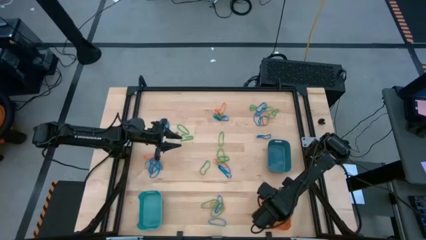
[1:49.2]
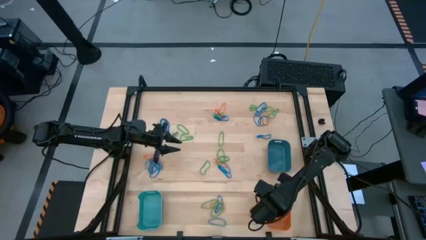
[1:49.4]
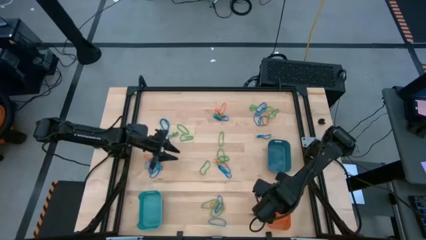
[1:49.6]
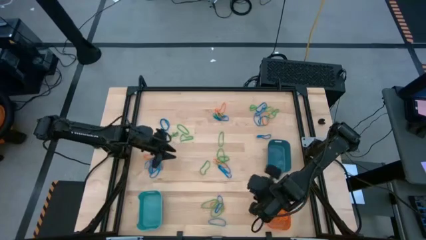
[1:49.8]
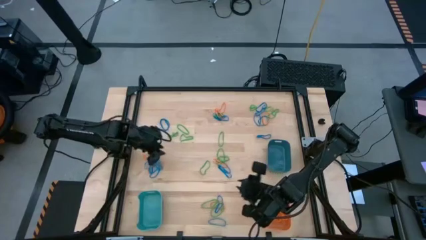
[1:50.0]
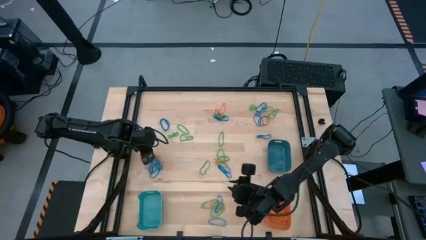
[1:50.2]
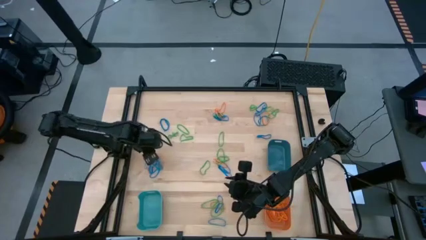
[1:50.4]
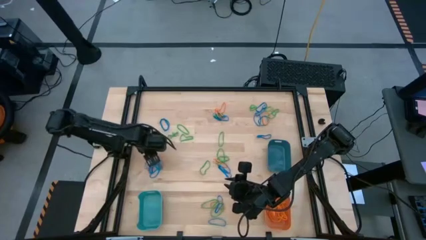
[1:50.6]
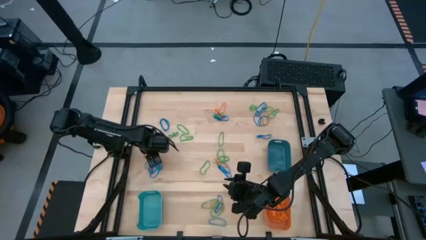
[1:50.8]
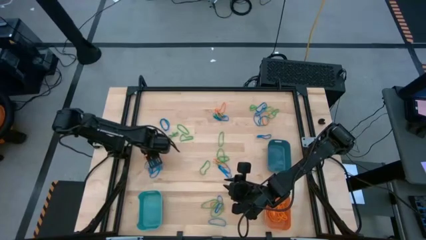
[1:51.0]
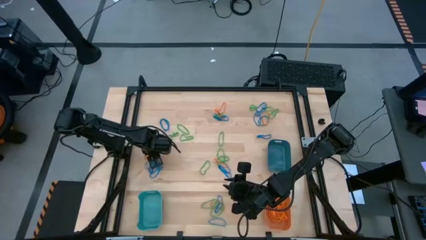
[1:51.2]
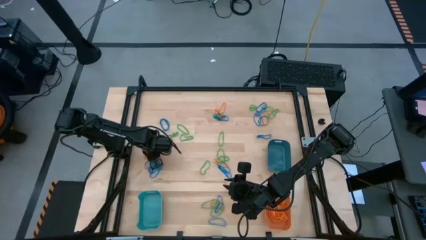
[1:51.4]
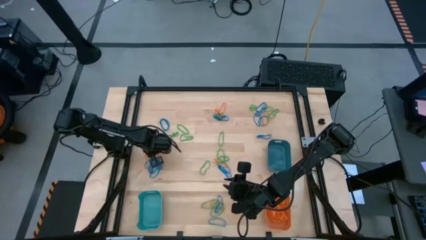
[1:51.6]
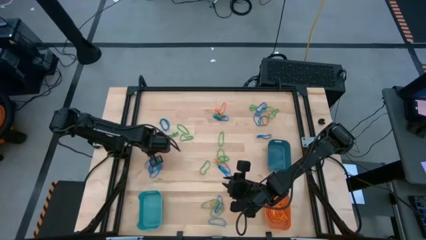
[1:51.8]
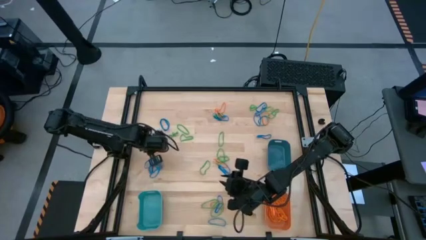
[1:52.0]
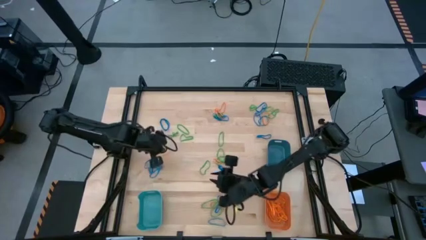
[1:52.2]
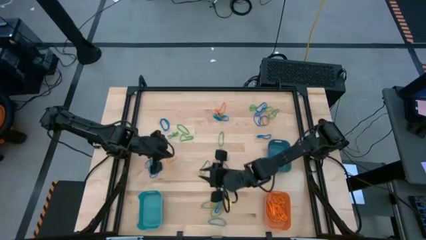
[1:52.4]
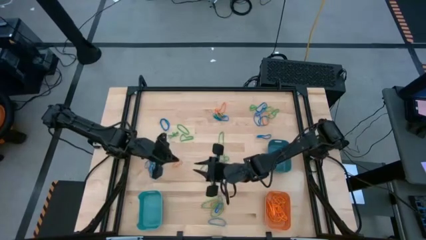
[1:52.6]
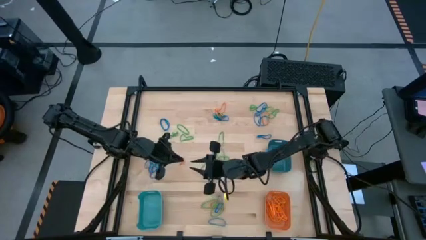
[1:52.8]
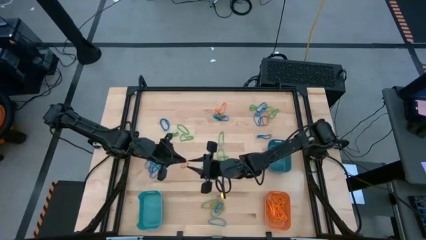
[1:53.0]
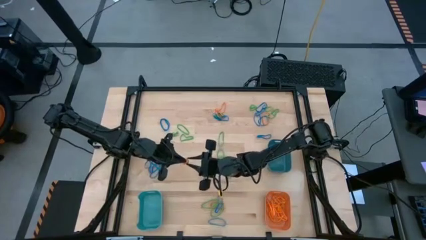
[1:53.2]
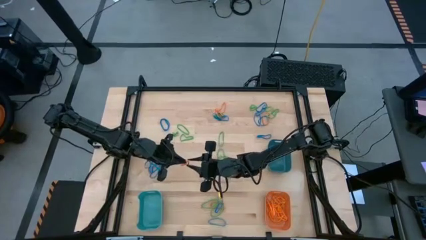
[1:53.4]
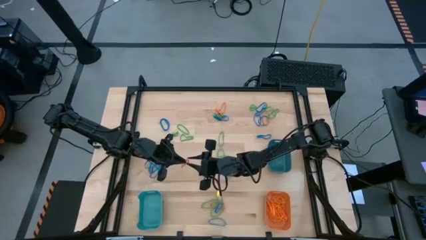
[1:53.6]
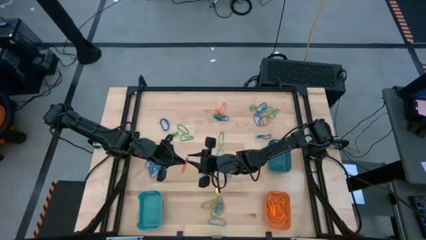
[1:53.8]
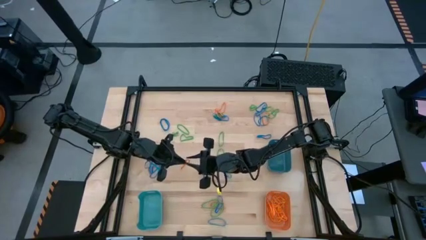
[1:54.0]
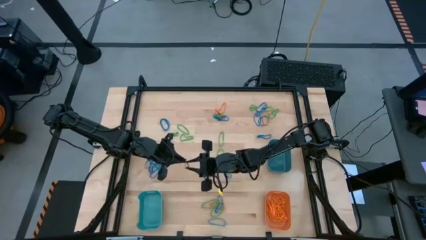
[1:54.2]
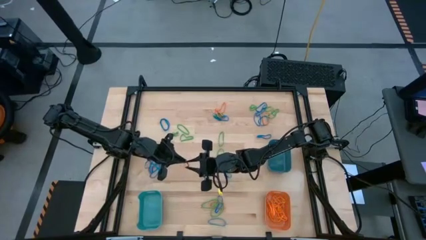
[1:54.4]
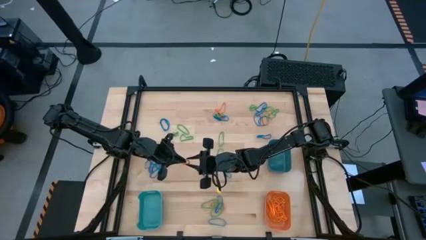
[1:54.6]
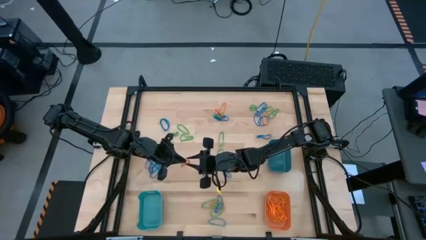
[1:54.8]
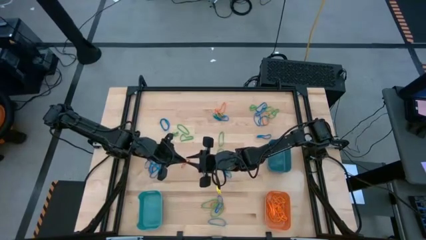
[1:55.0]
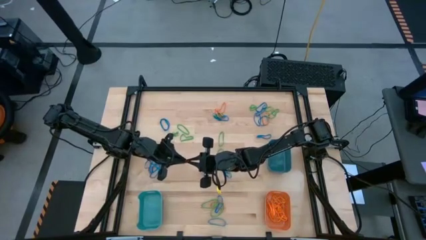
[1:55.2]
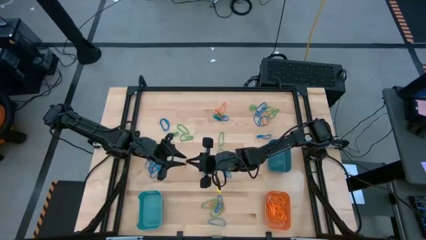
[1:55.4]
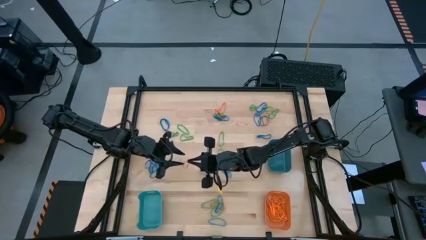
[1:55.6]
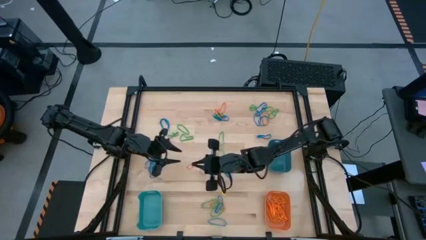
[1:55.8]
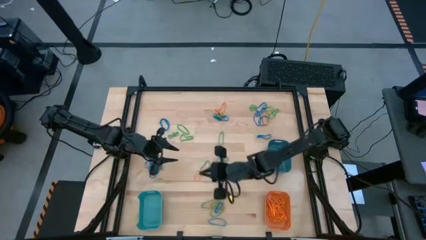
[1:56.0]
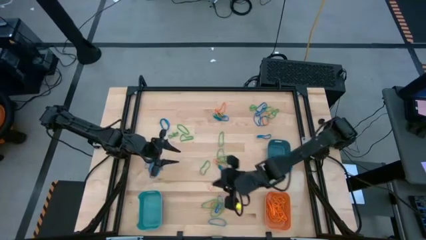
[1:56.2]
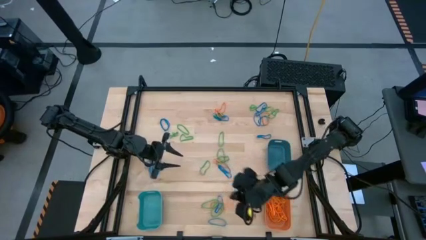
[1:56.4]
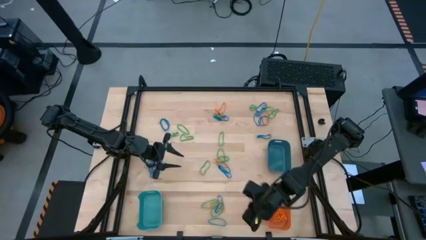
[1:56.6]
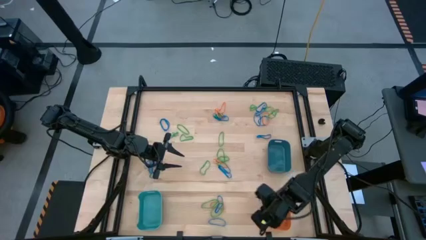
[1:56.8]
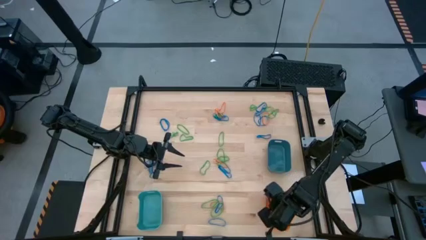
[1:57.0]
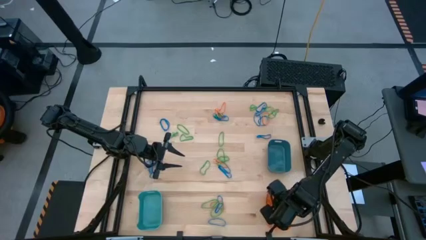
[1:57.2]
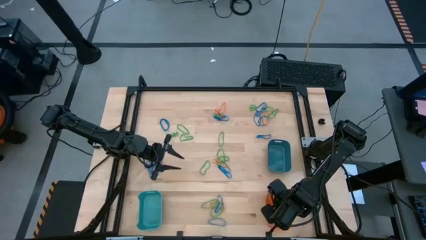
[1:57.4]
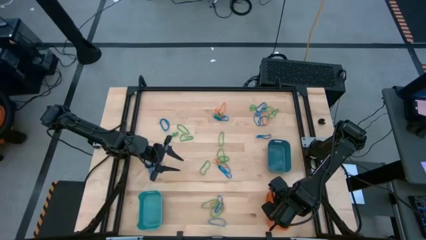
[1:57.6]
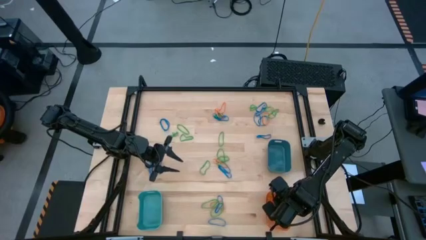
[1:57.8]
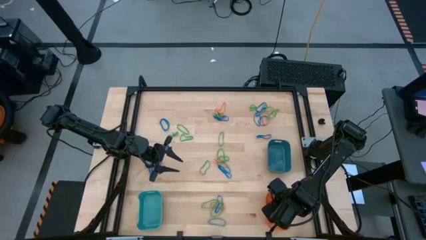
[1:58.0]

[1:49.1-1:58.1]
Task: Sort rubber bands into baskets
Put the orange rubber band into the orange bin

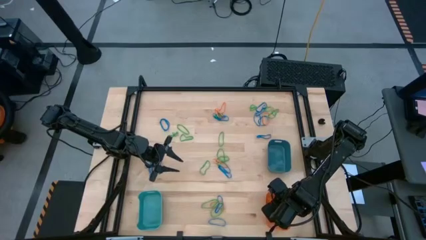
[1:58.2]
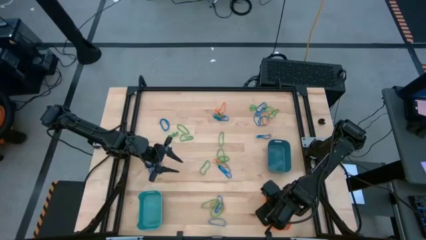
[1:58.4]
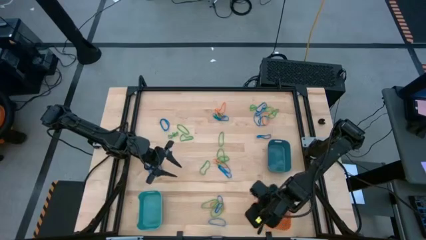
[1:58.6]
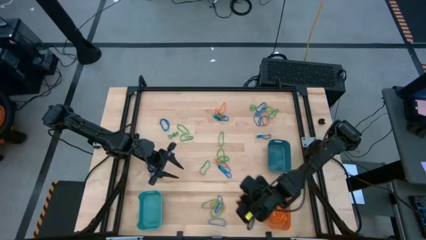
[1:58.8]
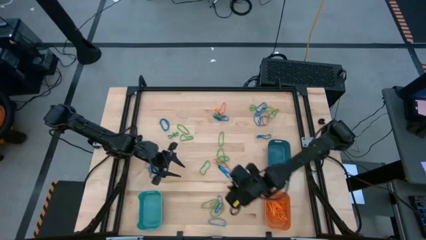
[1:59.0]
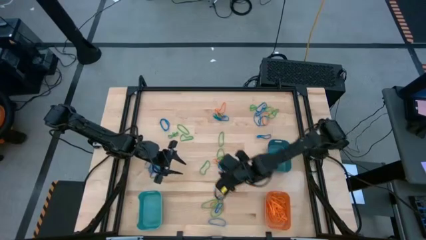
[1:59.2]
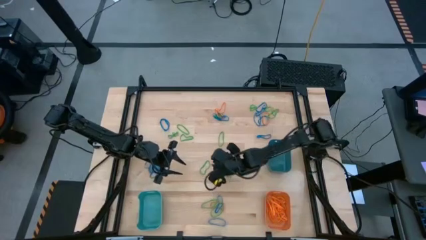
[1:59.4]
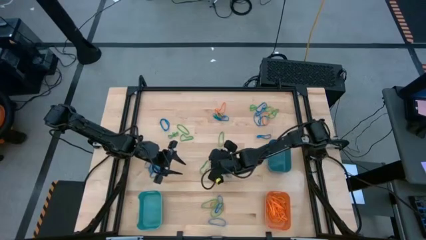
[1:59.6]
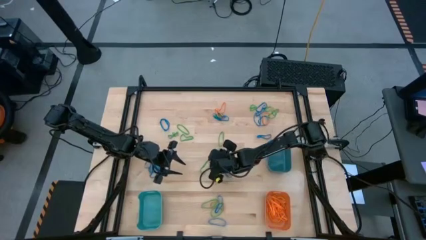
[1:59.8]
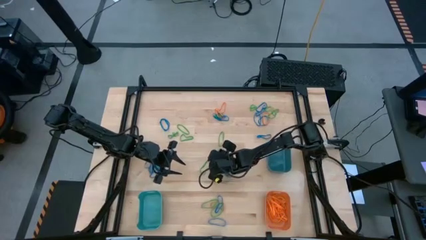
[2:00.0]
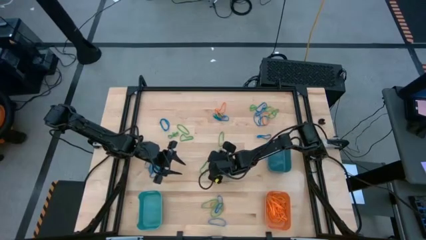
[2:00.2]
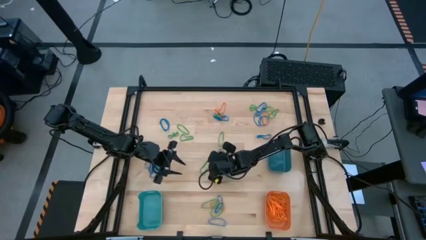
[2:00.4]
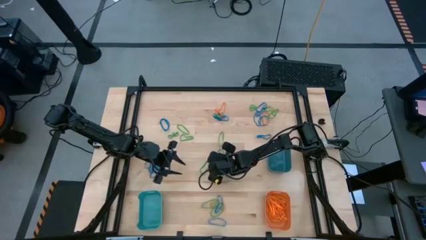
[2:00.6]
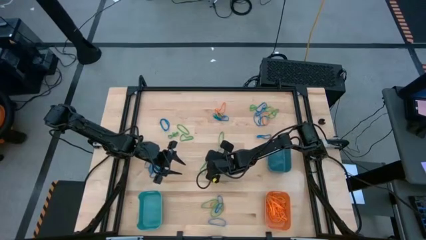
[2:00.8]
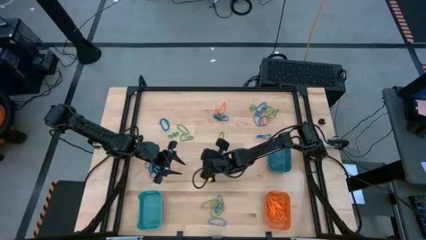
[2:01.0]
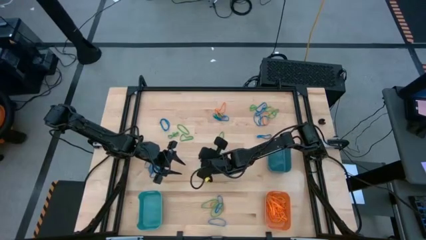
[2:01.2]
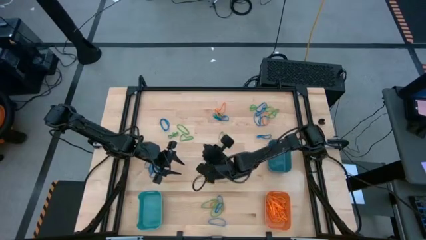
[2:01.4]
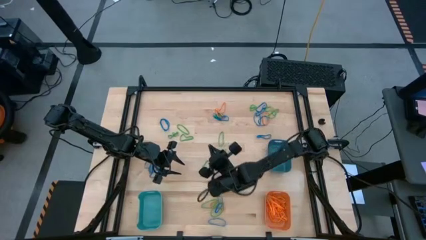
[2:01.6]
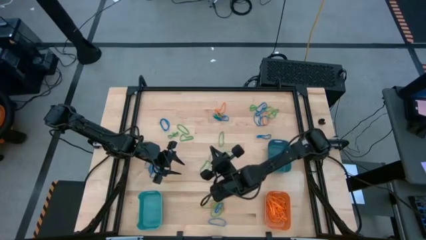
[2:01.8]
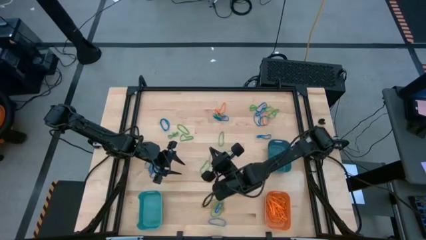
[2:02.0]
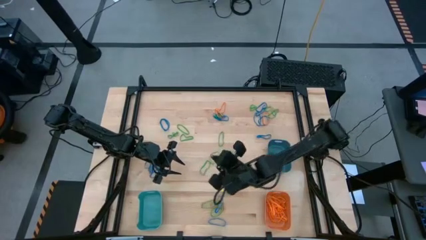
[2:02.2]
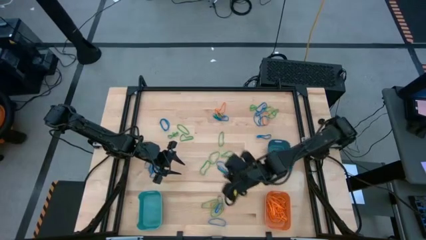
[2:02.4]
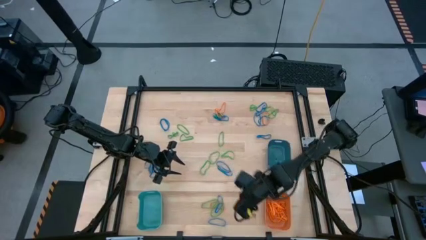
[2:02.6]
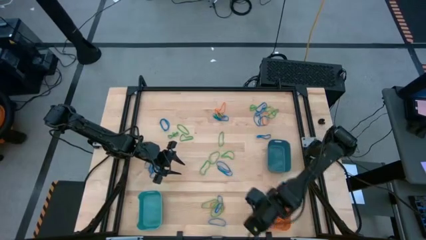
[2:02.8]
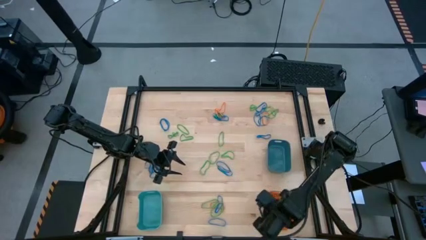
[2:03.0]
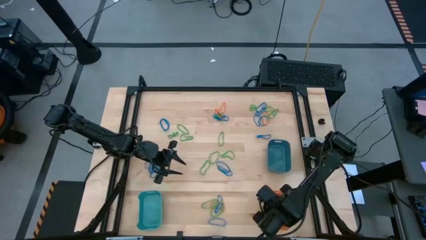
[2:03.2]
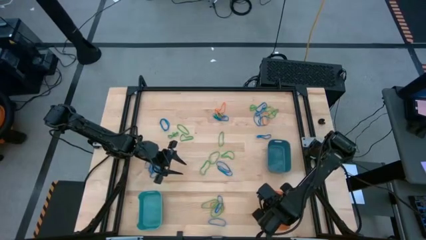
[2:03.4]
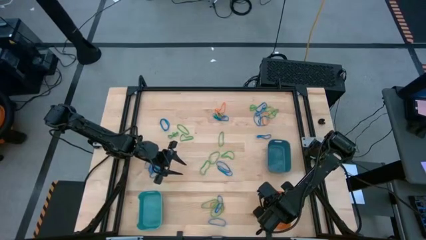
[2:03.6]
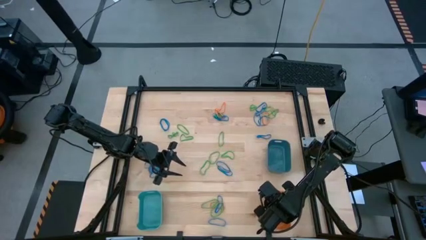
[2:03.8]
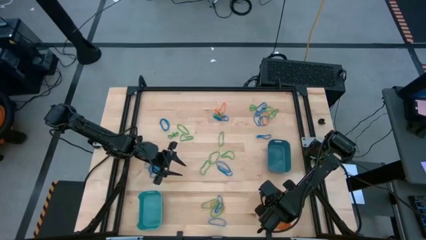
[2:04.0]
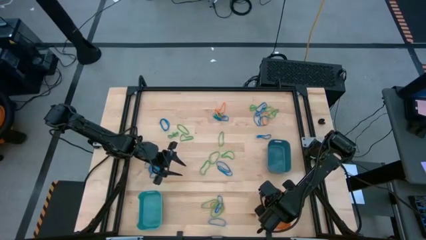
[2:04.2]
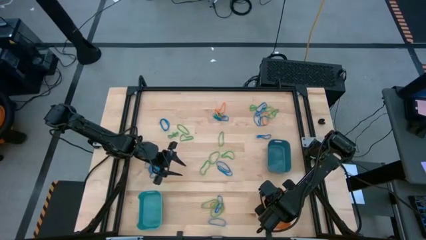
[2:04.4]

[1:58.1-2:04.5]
Put the orange rubber band into the orange bin

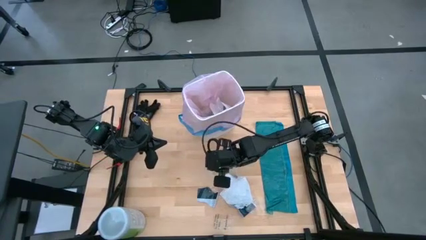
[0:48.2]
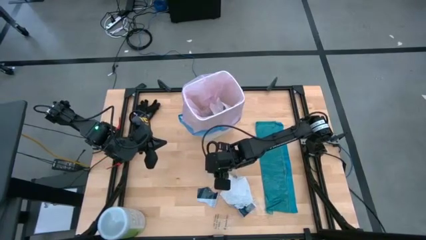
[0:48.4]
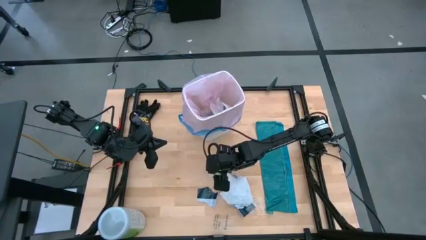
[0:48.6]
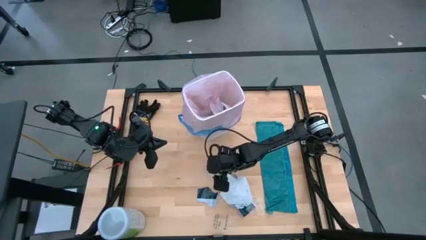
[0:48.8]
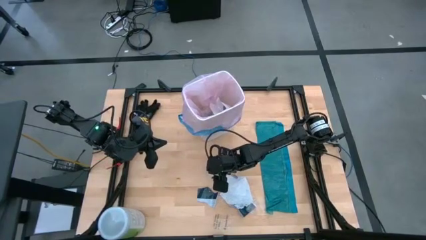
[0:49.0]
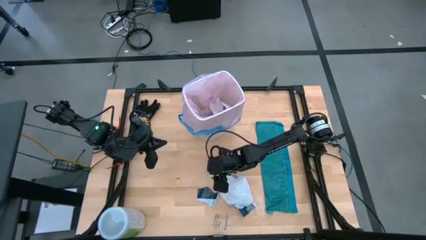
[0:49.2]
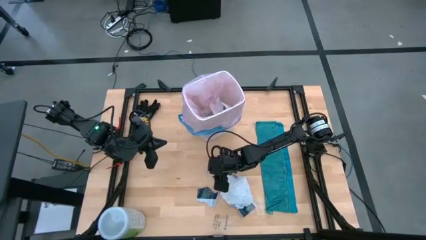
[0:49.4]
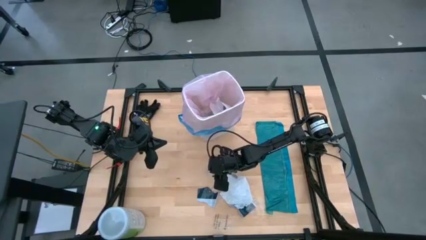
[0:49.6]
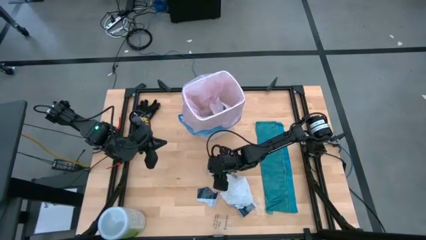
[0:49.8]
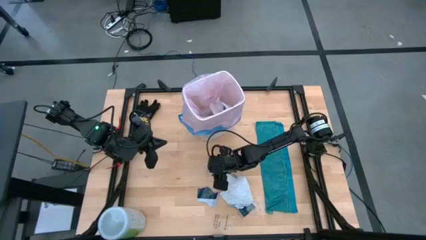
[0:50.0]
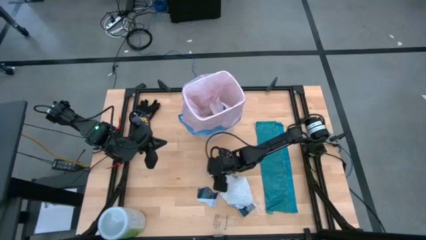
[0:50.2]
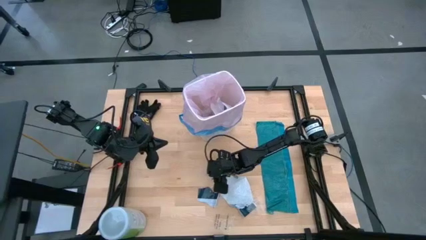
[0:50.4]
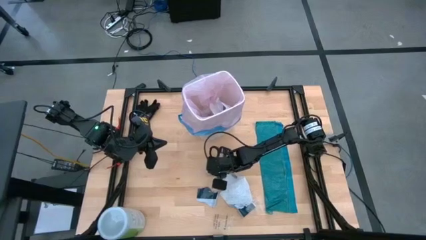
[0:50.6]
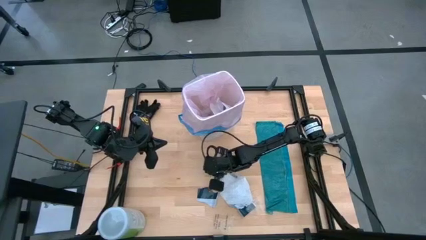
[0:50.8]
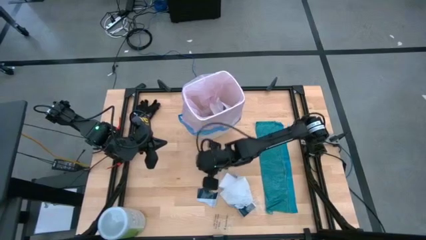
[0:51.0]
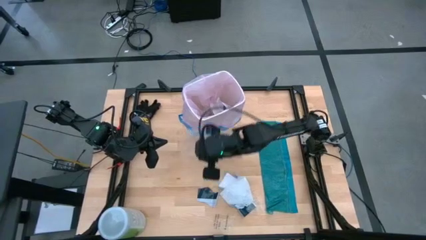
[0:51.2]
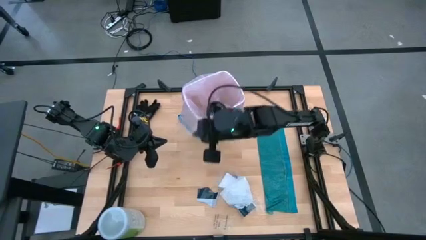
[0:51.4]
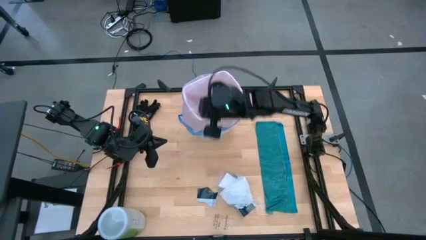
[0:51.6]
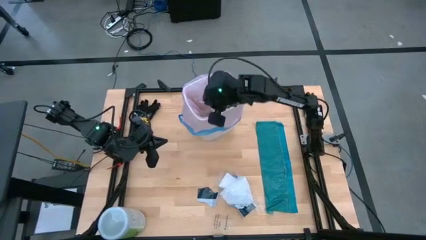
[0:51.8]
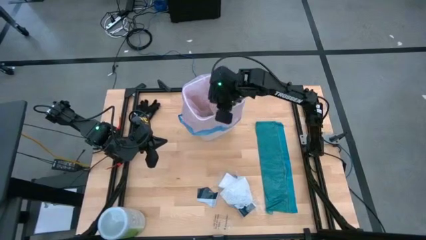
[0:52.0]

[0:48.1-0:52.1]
Task: place trash/remove bag and relplace
Put the transparent plastic into the white trash bin
